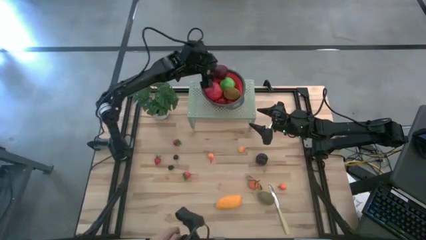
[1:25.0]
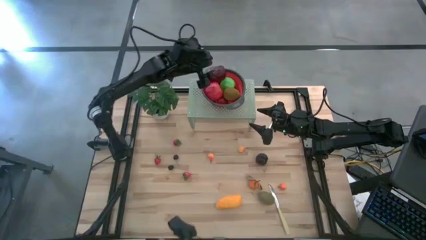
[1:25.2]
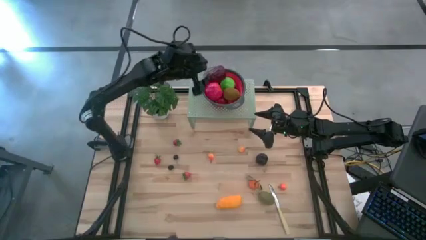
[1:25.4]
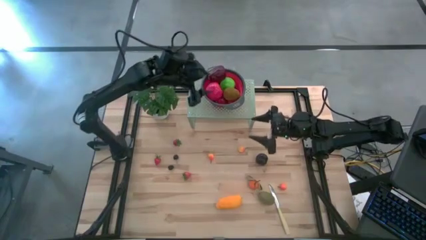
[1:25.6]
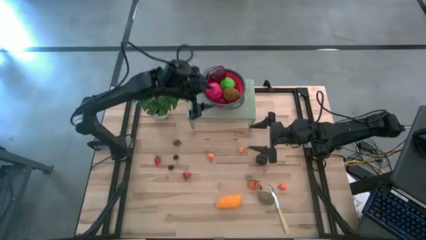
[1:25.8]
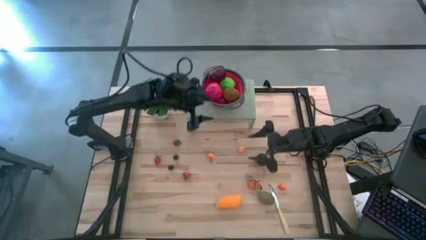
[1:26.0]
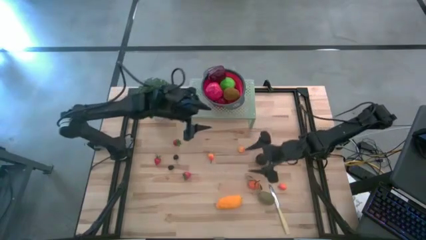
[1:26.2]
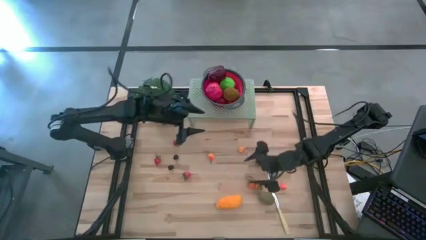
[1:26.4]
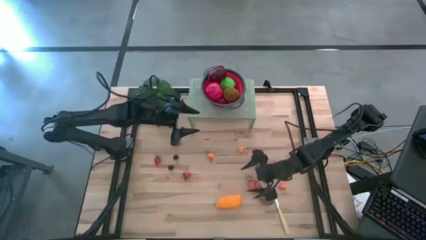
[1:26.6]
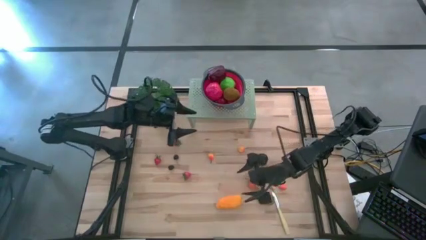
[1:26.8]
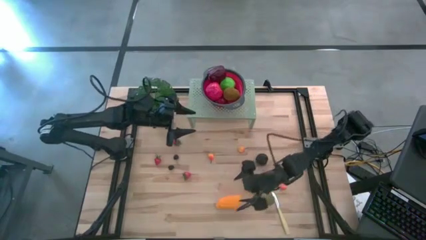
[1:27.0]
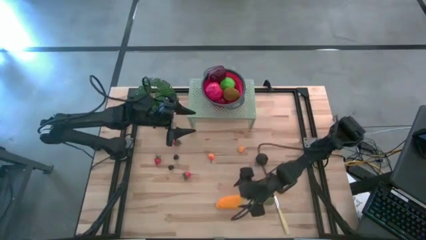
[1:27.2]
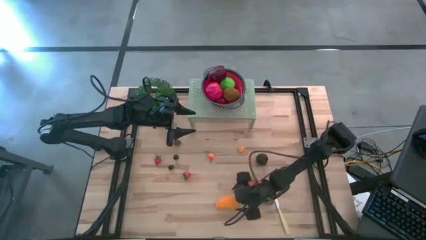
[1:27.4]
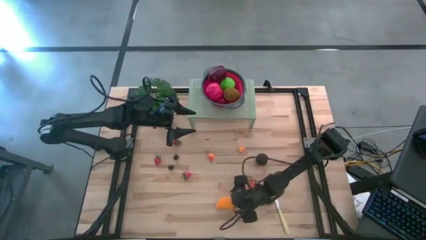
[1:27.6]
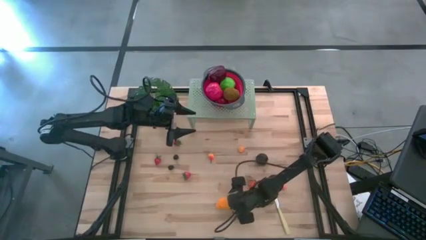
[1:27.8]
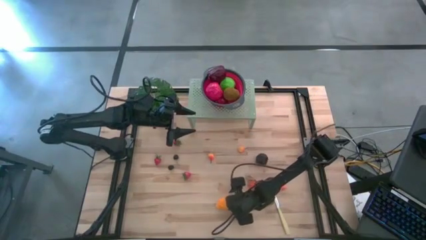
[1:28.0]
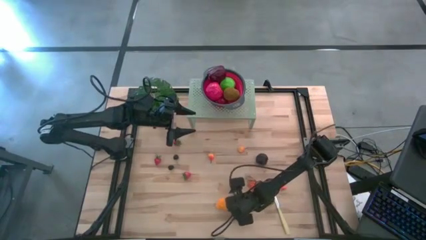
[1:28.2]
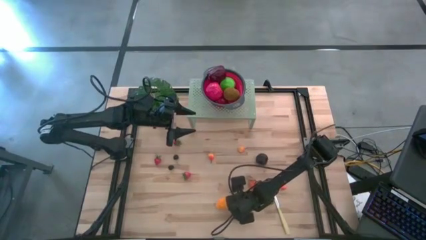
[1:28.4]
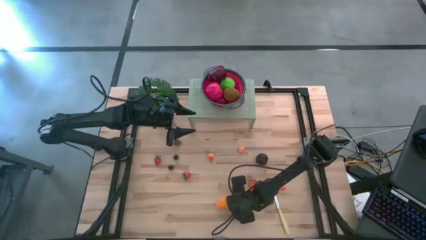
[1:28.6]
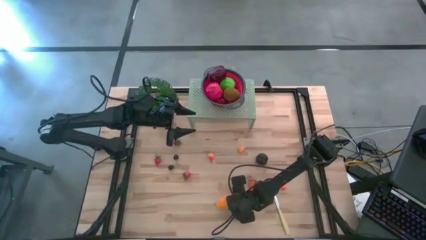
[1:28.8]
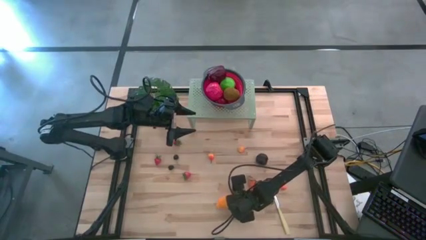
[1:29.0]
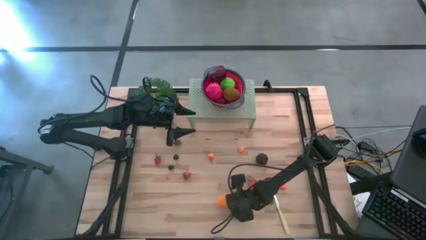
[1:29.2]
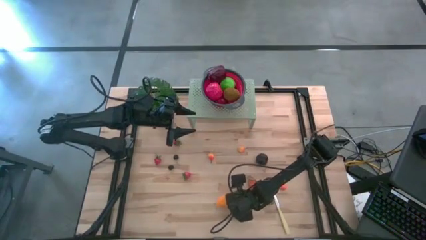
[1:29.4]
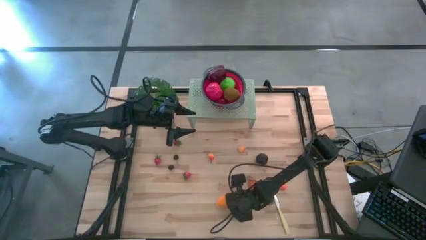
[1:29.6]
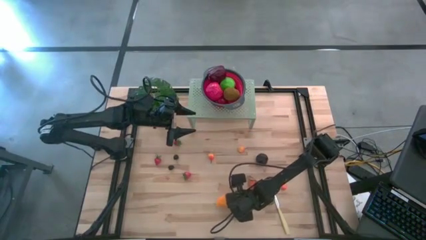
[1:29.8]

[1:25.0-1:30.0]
Task: Pick & Place Fruit
Put the mango into the red strainer bowl on the shelf

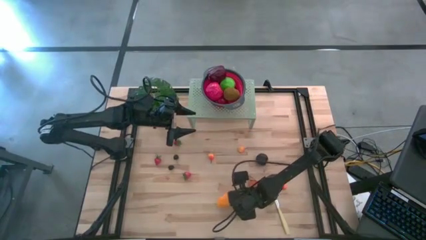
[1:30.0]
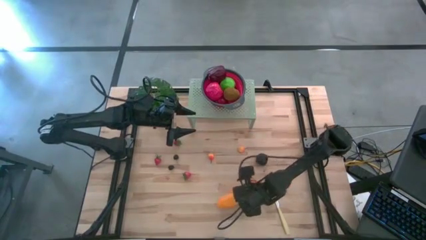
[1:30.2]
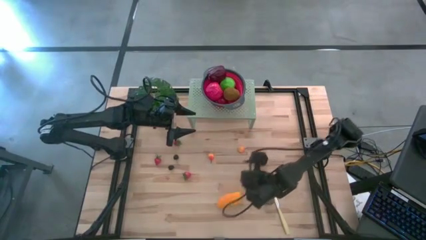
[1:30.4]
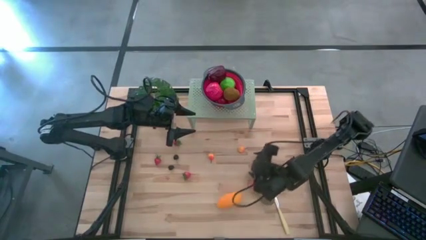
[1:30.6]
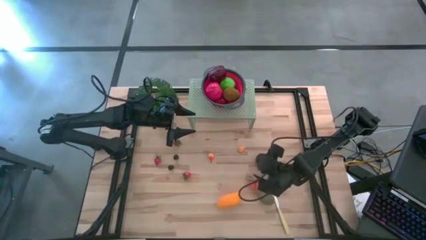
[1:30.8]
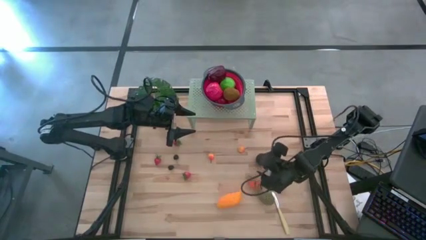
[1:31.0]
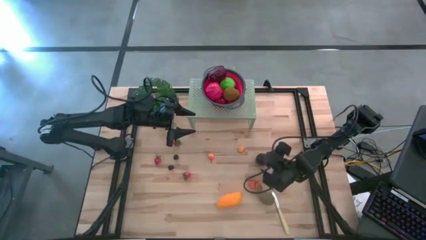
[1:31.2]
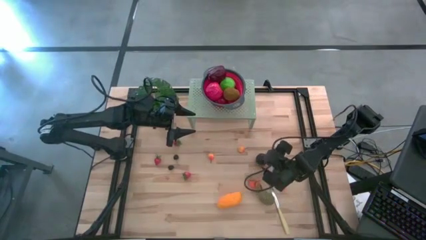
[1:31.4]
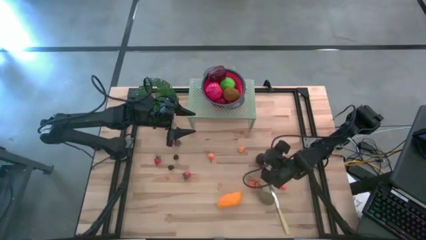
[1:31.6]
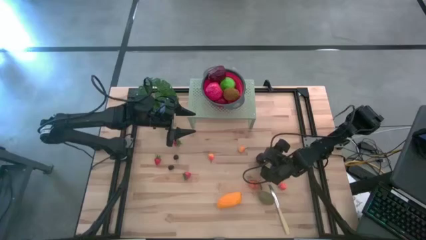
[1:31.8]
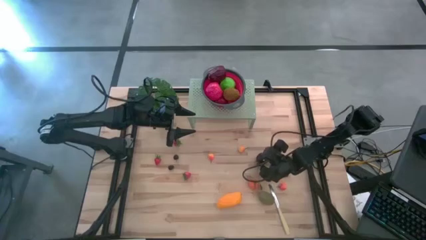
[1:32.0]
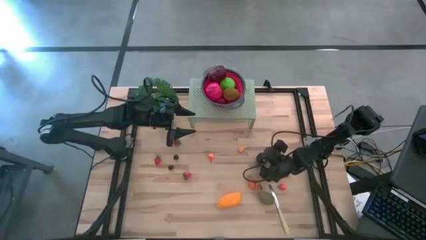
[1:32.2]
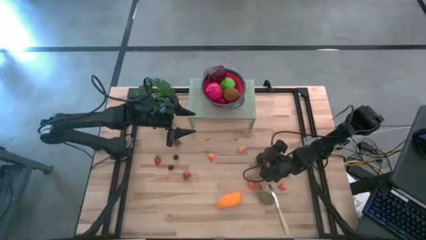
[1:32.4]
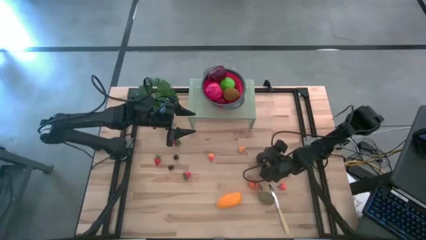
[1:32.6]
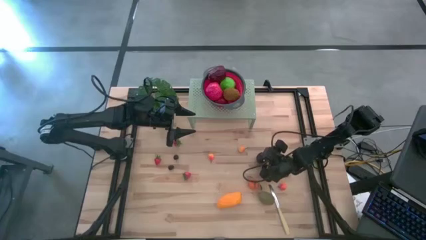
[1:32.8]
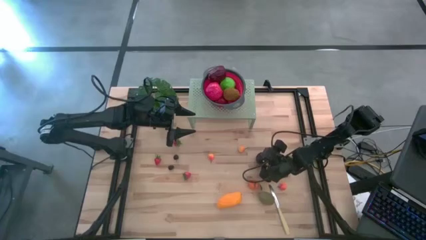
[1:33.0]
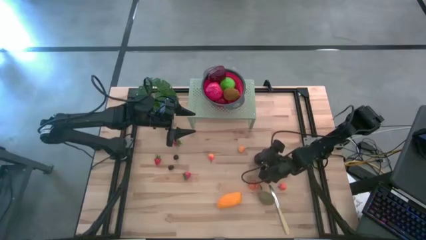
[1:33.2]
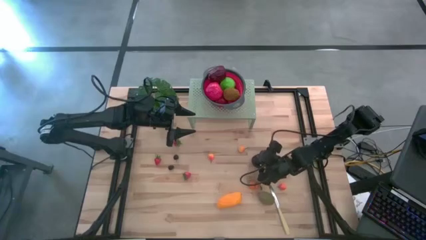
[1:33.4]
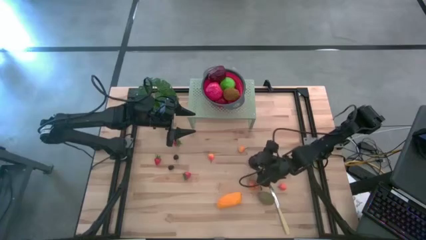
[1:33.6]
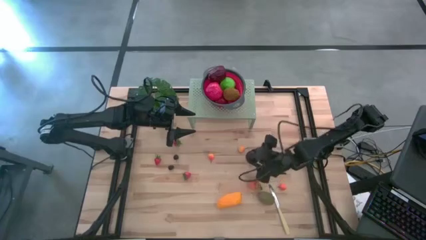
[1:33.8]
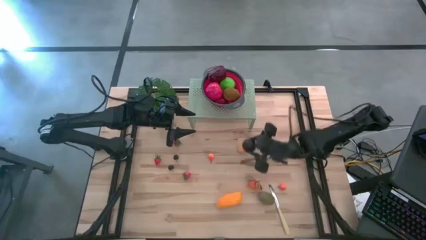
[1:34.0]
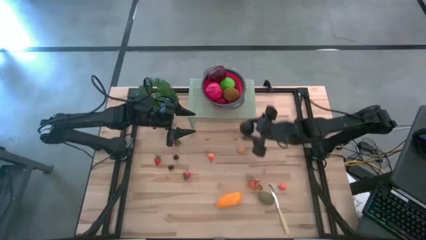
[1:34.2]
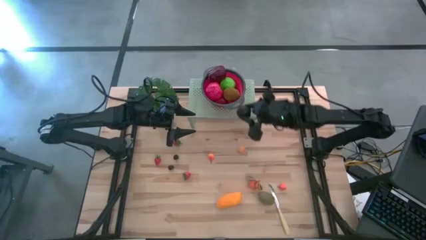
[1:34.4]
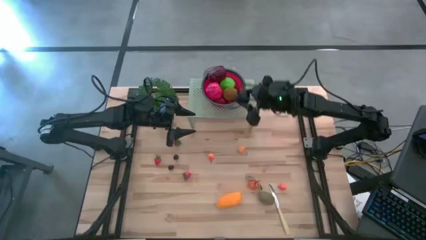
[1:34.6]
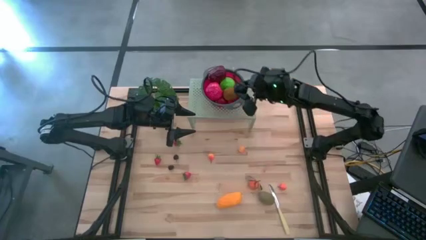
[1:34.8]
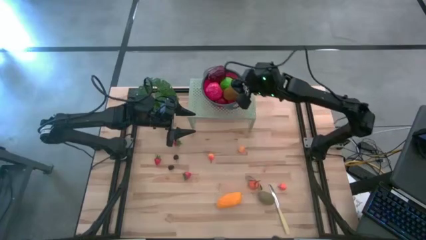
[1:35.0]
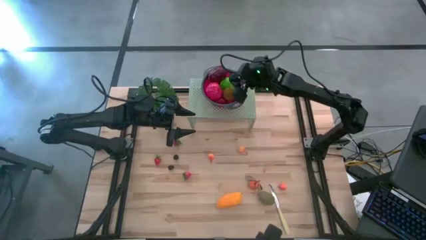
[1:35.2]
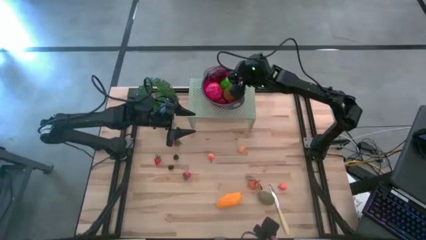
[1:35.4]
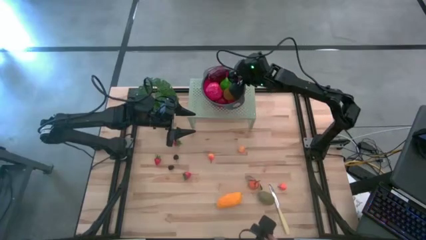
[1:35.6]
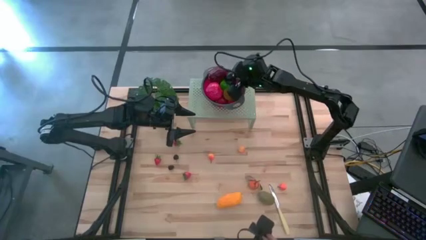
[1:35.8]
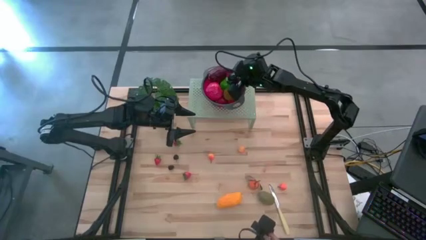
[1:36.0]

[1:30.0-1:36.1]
Put the plum into the red strainer bowl on the shelf

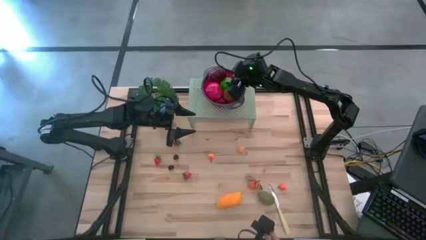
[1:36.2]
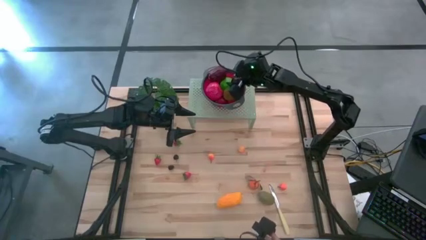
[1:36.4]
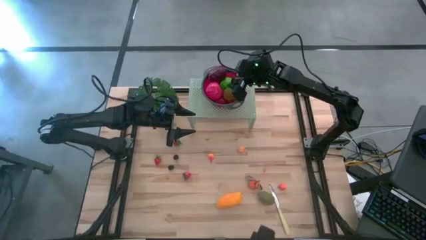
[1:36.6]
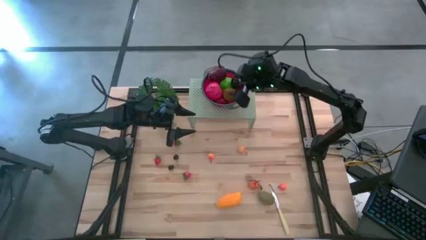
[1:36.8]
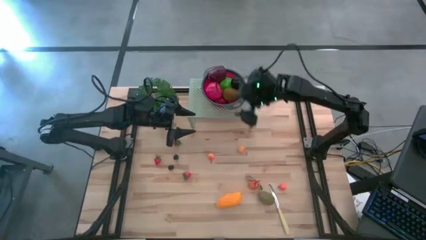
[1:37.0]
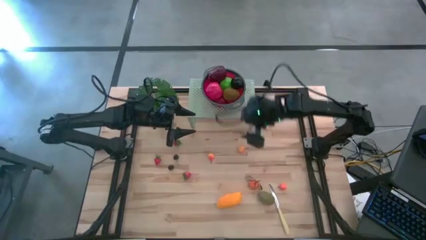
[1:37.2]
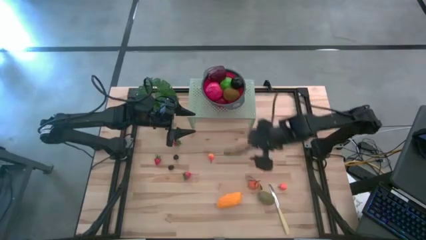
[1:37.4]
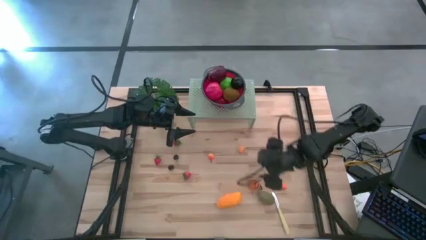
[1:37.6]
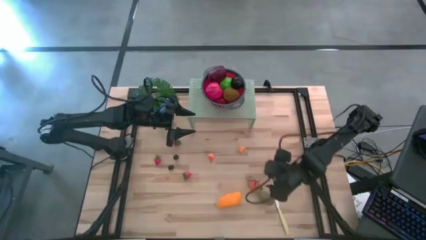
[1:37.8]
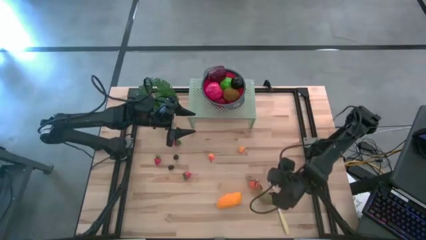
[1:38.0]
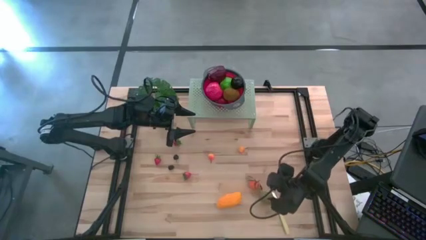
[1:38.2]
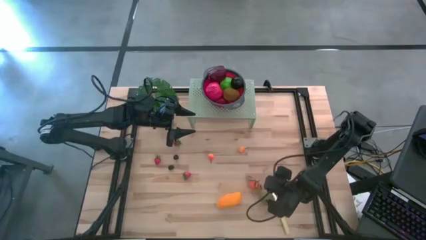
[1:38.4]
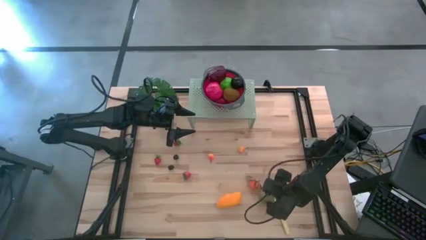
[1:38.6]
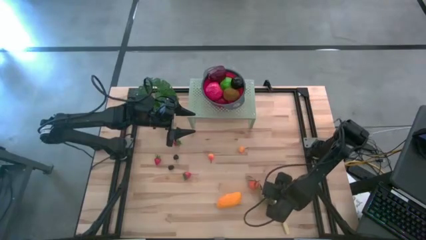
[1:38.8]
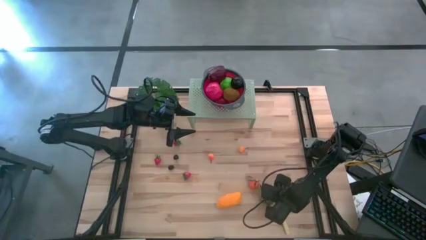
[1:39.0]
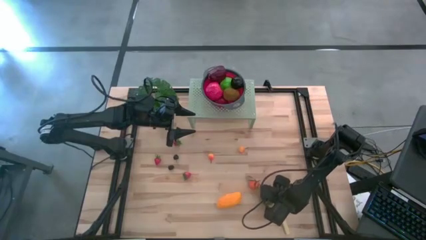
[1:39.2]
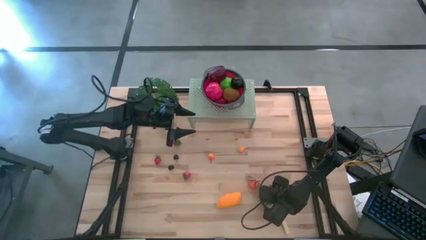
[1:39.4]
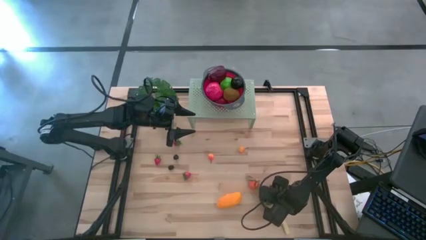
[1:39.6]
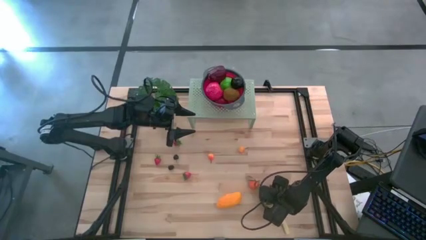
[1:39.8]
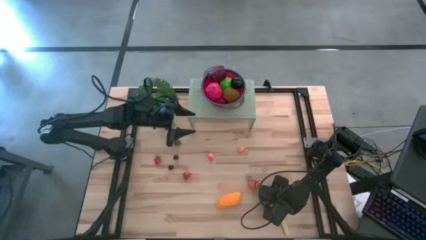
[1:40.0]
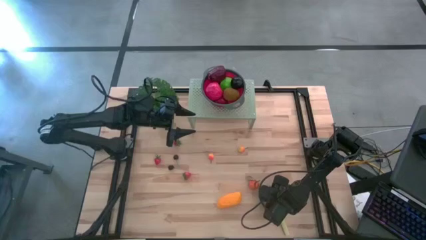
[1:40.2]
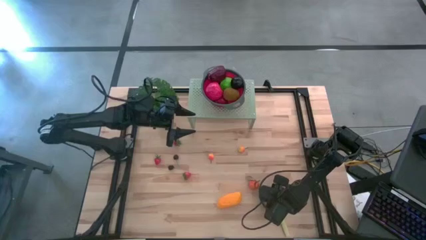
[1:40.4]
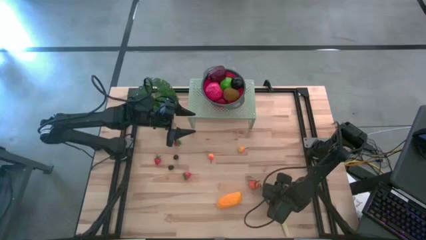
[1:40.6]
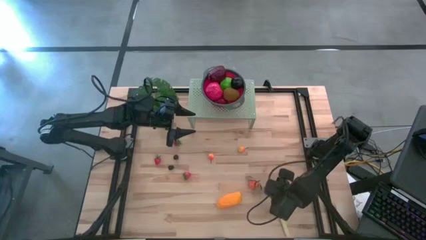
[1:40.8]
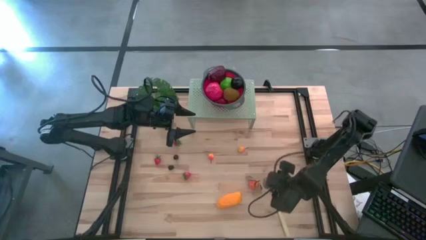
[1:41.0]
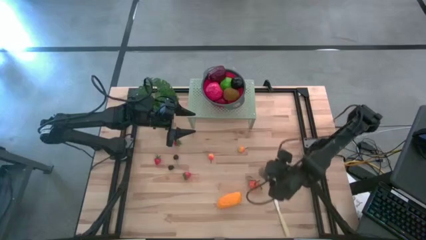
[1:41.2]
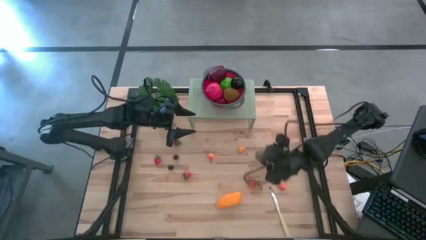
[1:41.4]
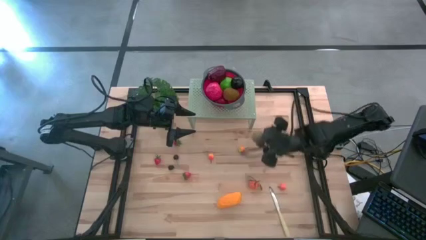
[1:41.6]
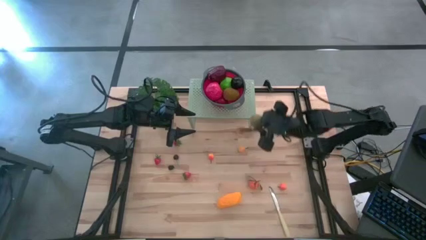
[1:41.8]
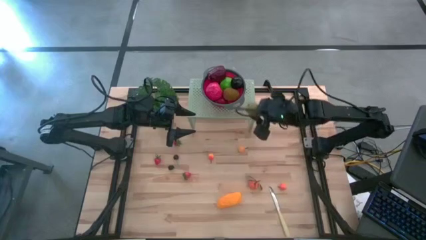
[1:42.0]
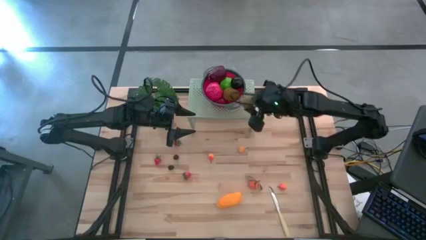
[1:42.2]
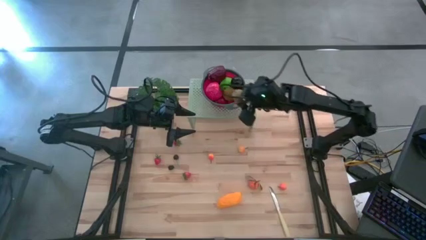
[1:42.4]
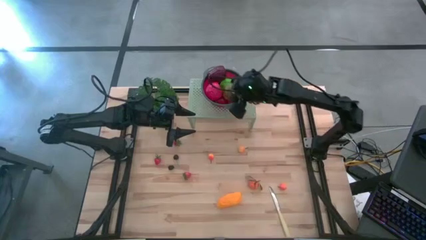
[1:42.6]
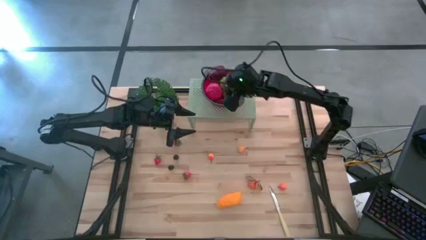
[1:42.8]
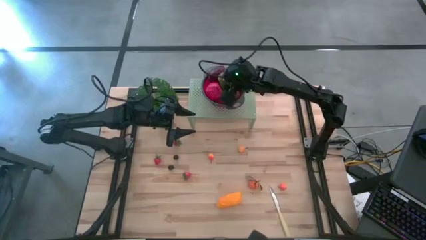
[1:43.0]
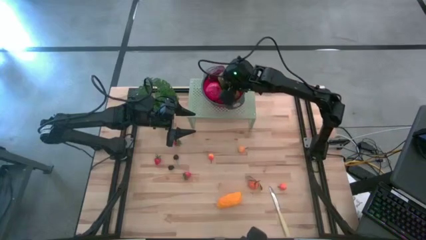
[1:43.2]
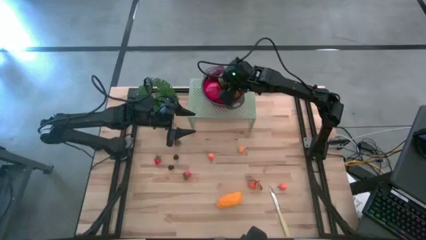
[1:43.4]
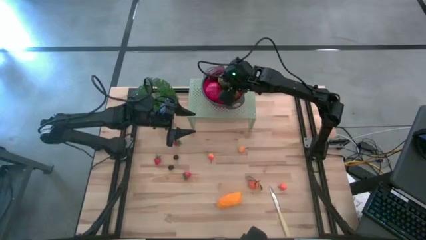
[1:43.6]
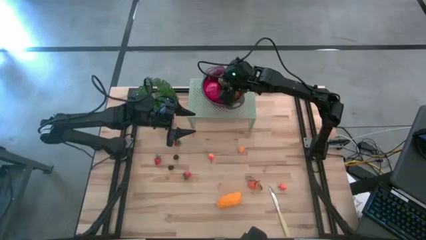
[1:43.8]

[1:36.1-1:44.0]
Put the kiwi into the red strainer bowl on the shelf
